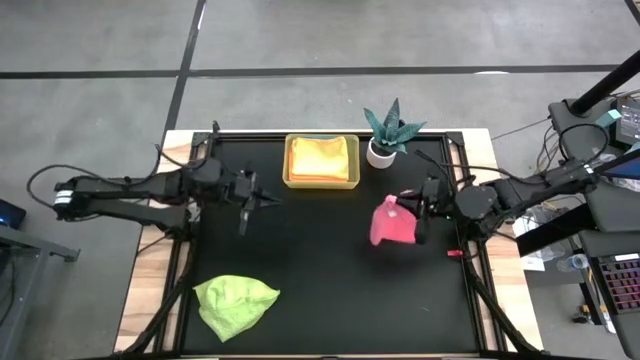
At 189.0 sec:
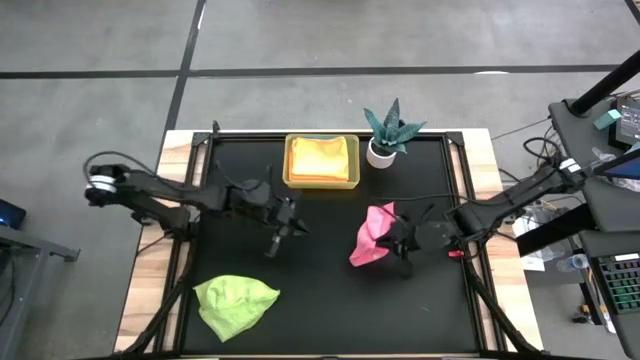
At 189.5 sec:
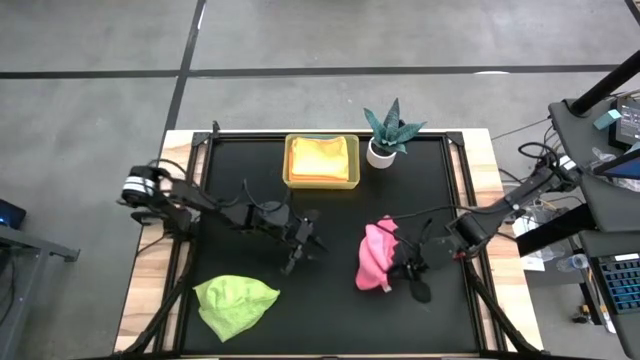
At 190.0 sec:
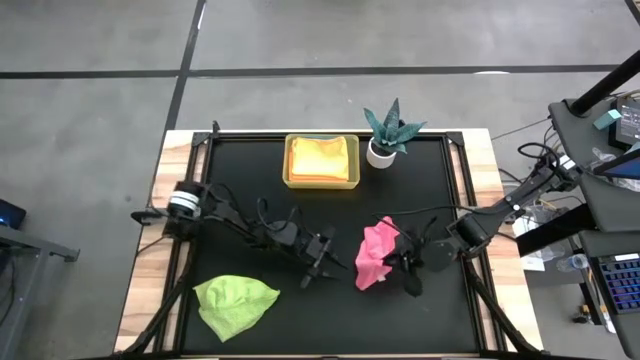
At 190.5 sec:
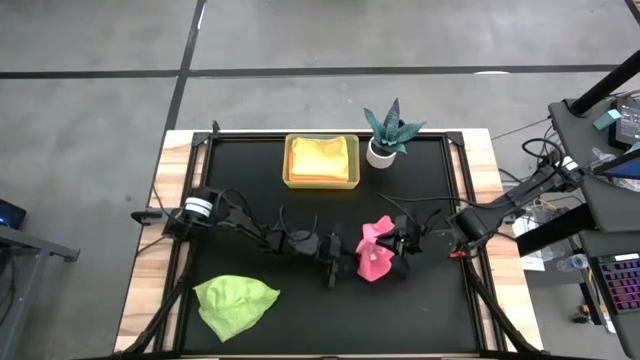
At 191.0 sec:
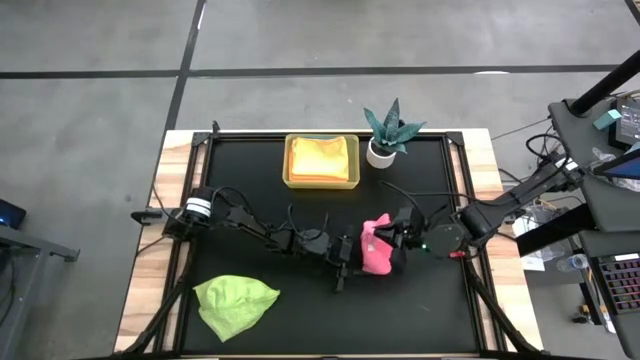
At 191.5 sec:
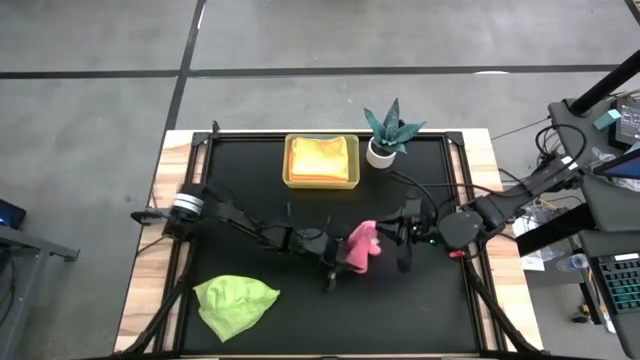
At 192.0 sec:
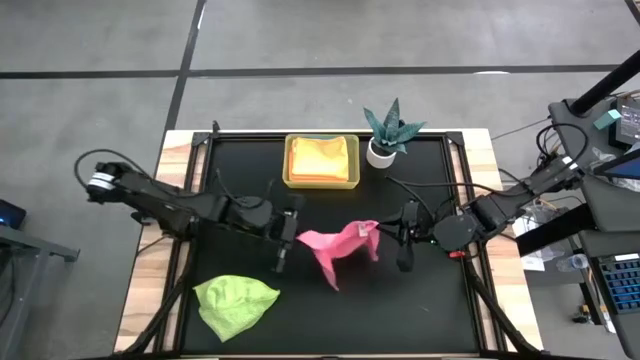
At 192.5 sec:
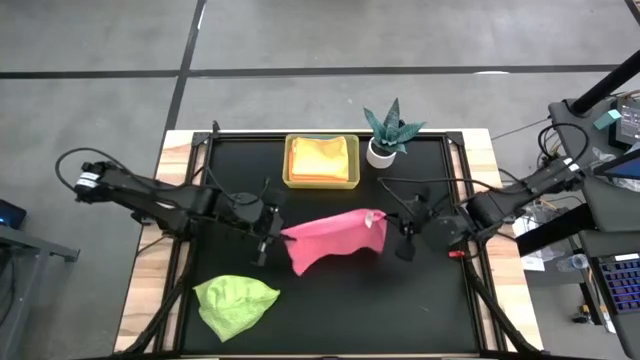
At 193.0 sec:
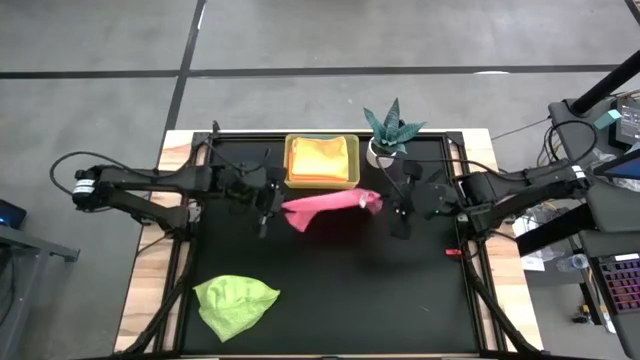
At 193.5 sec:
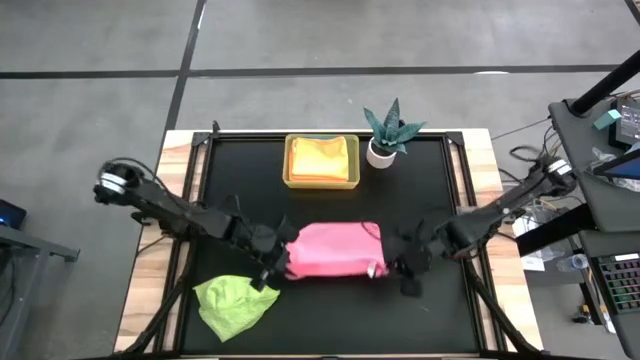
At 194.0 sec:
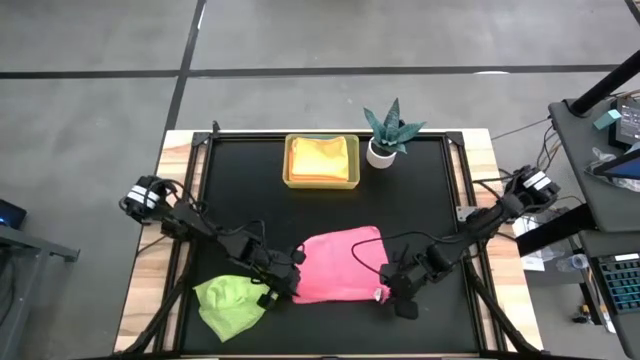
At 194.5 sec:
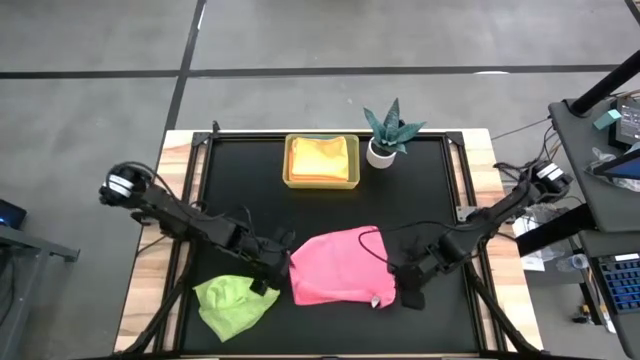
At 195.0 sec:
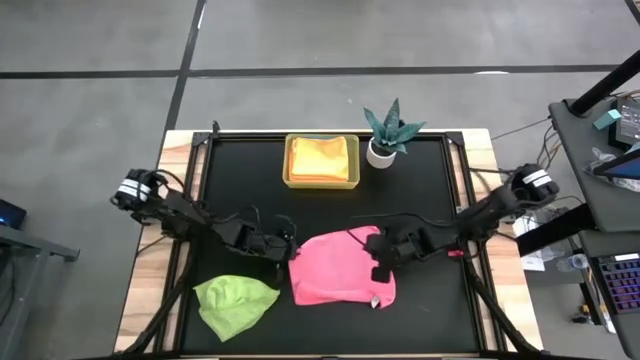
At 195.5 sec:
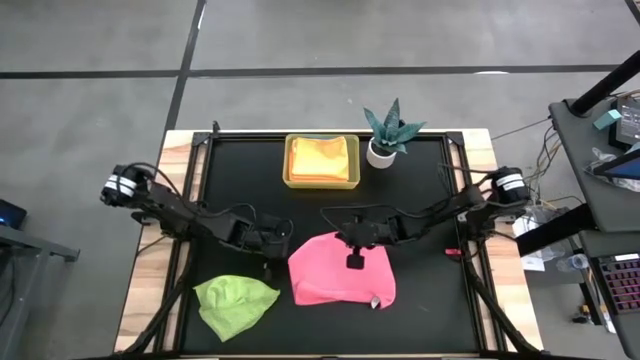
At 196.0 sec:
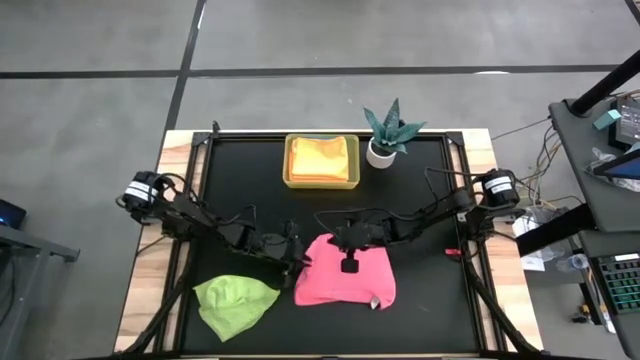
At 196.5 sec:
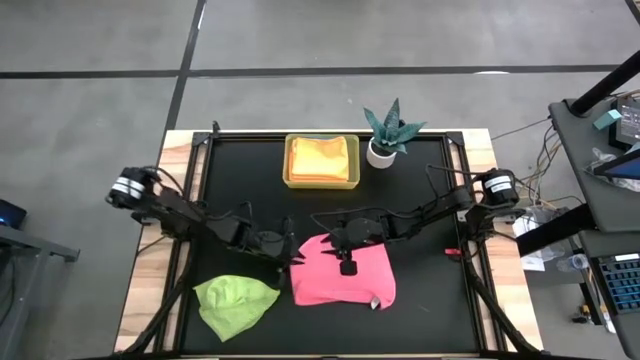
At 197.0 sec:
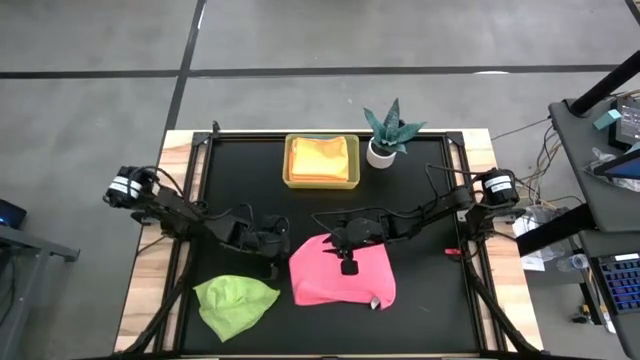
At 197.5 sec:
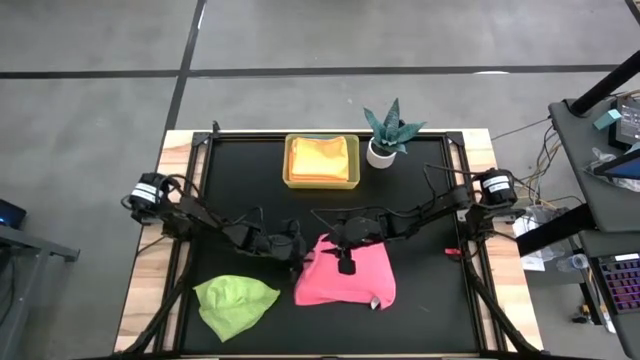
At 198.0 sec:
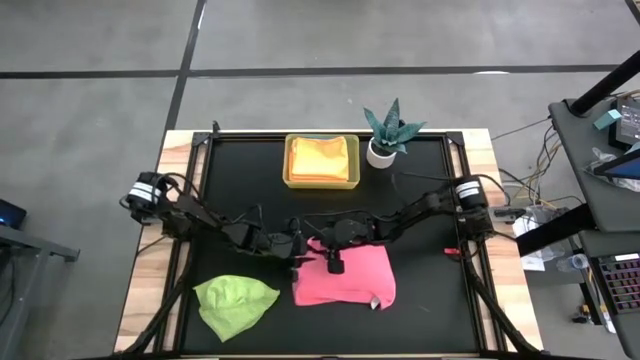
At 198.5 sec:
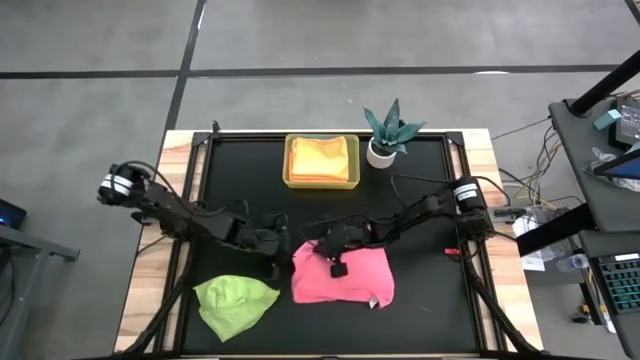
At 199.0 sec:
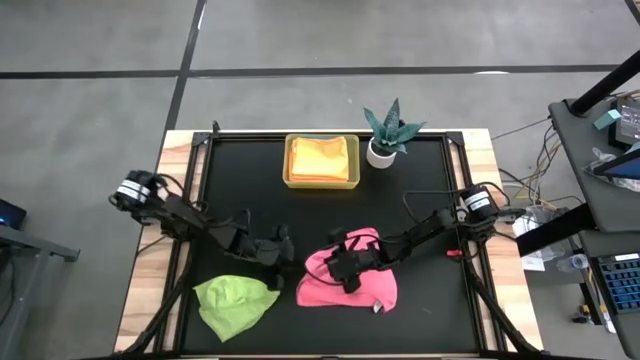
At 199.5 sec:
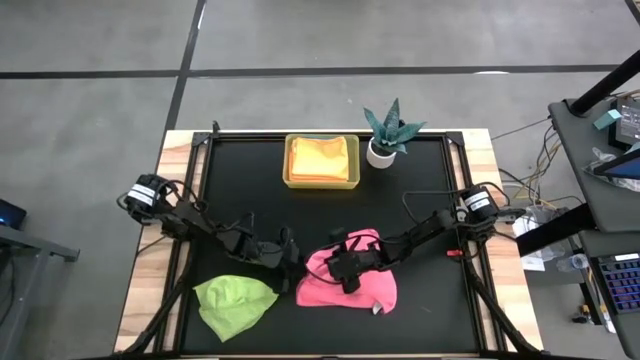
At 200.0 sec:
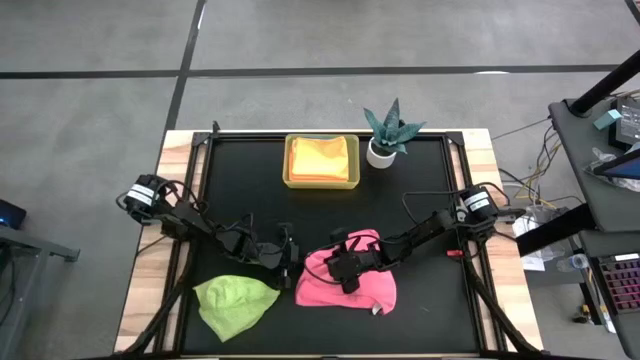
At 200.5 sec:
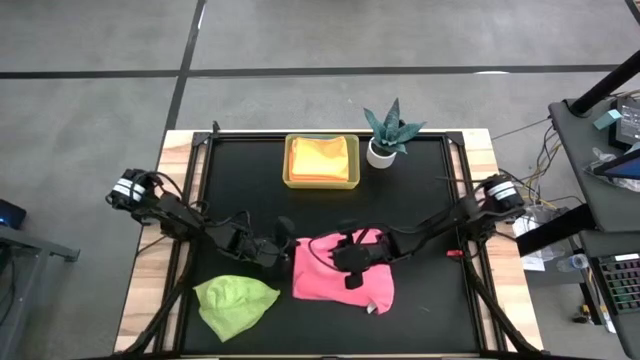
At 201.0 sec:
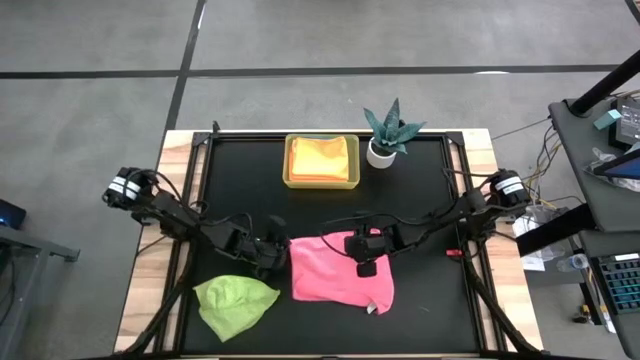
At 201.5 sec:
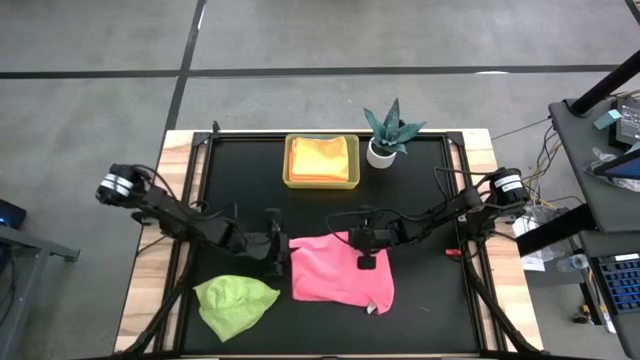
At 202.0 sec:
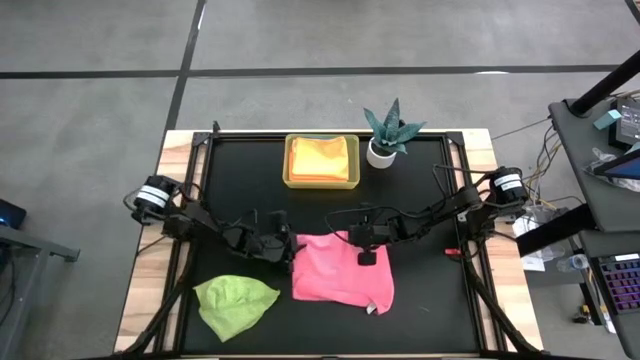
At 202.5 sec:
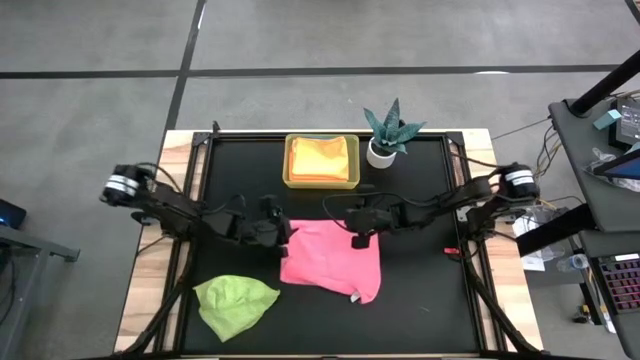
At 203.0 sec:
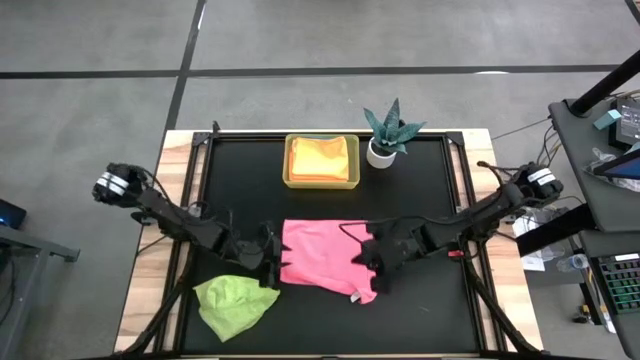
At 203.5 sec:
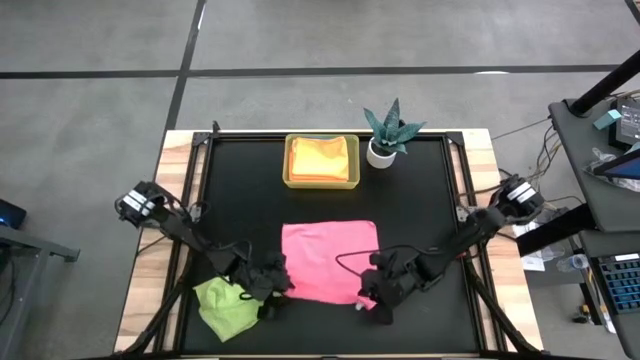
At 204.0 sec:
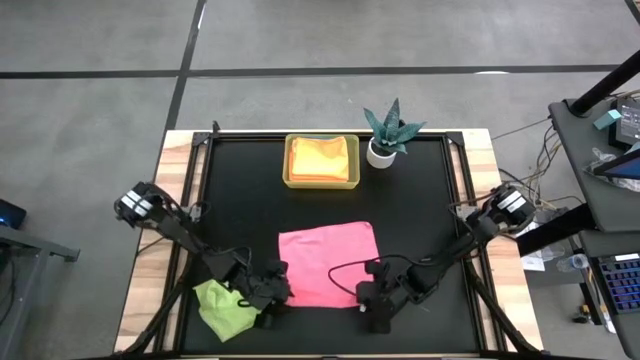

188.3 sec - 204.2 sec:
Task: Fold microfiber towels
Fold the pink microfiber cloth

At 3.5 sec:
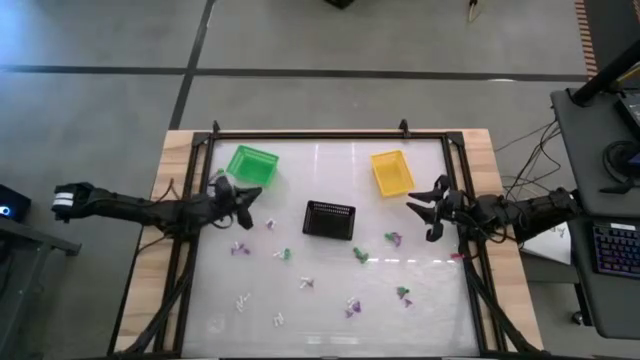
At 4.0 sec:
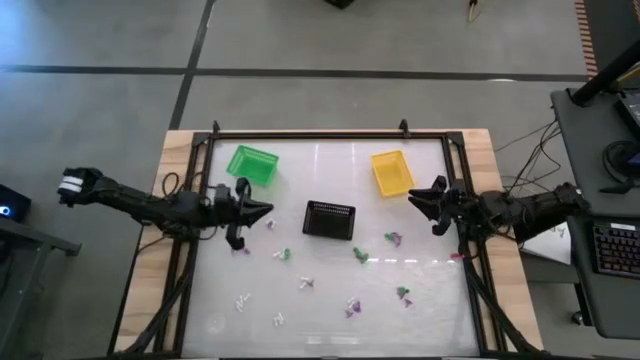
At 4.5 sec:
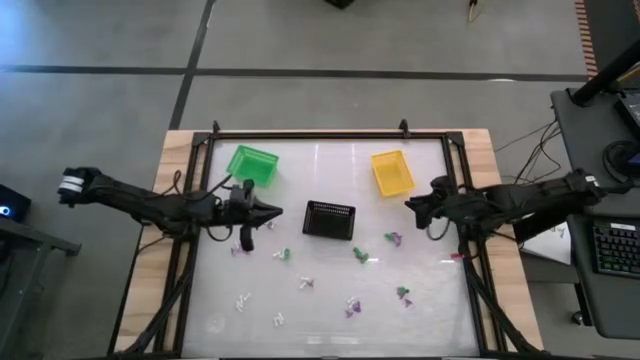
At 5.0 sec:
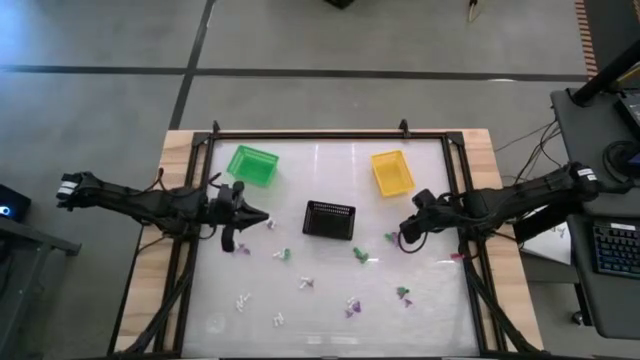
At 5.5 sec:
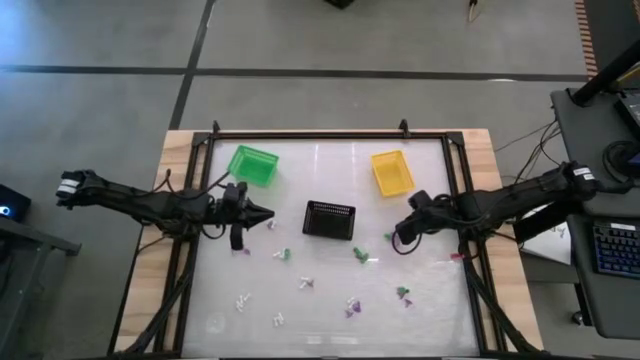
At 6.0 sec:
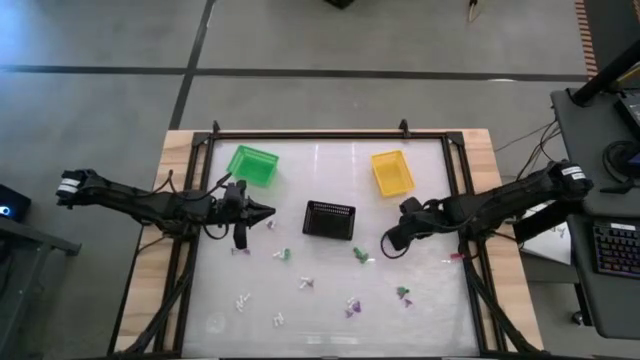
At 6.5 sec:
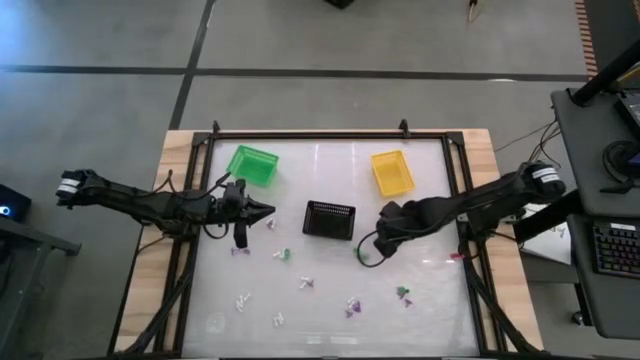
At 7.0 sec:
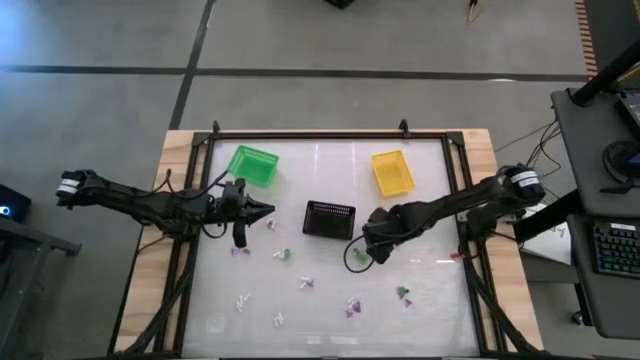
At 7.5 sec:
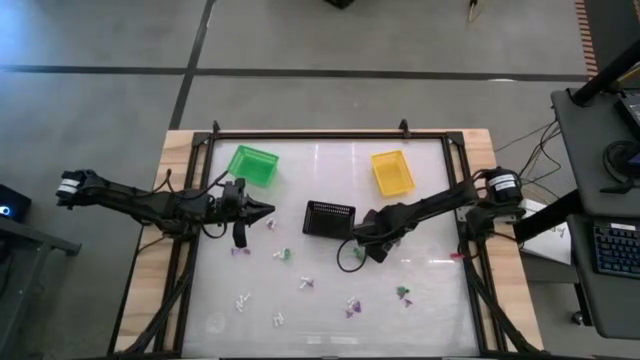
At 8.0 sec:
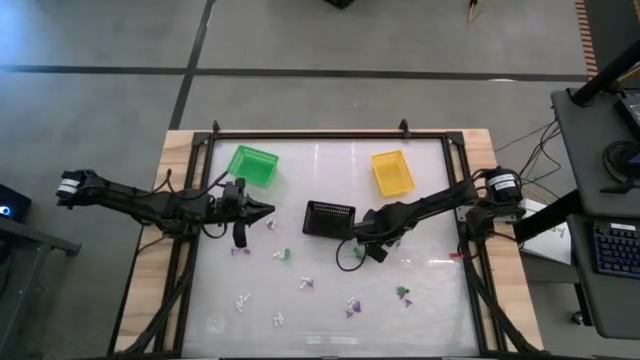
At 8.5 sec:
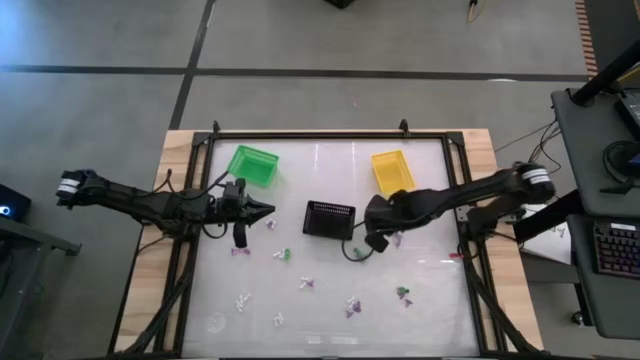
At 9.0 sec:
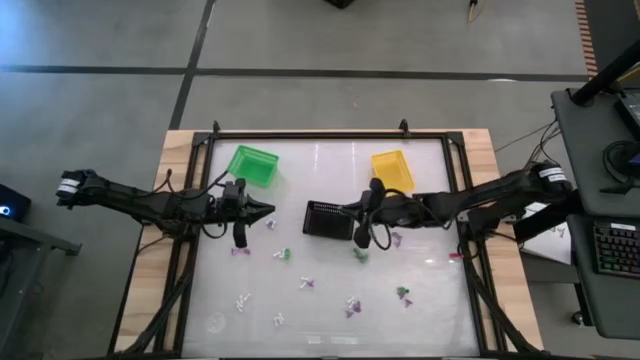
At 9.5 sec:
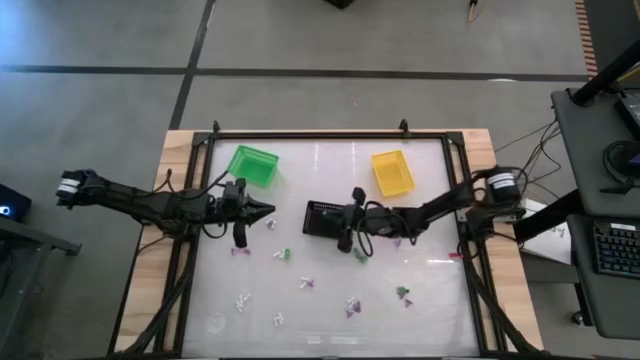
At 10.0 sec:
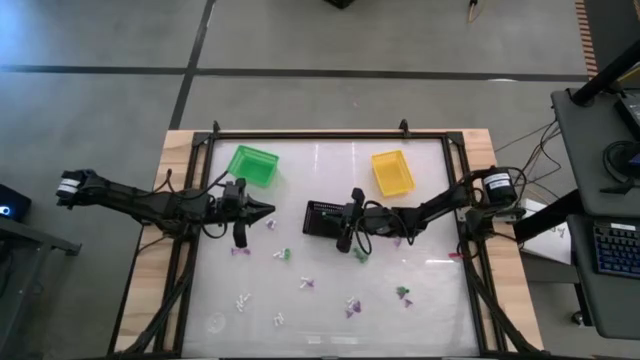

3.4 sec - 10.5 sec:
Task: Sort Halloween decoration
Put the green skeleton toy into the black bin
